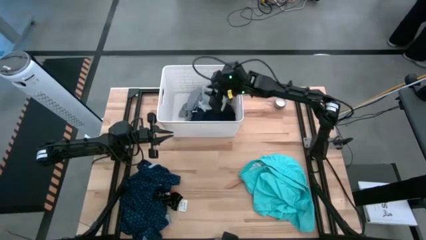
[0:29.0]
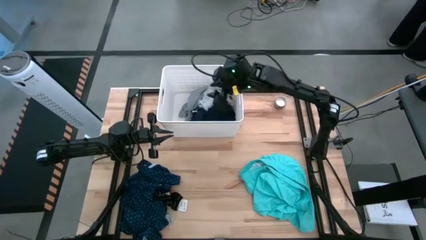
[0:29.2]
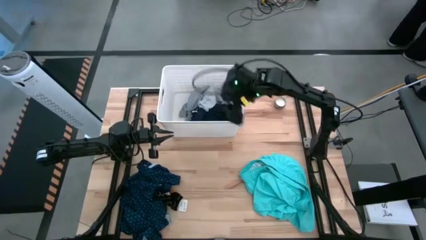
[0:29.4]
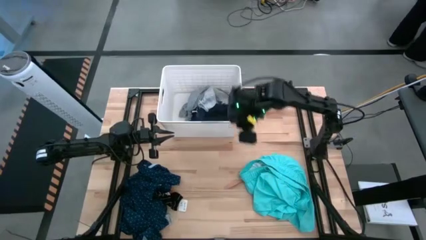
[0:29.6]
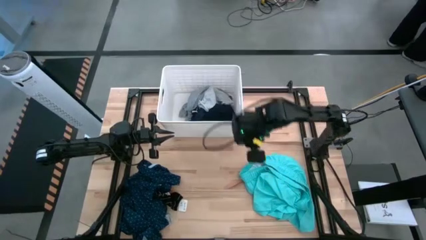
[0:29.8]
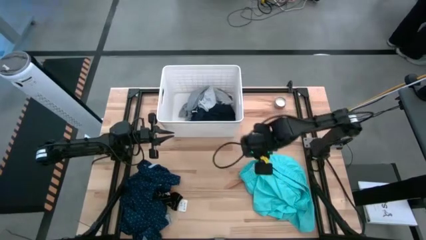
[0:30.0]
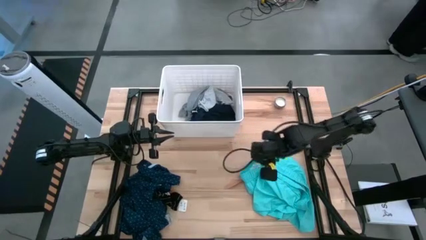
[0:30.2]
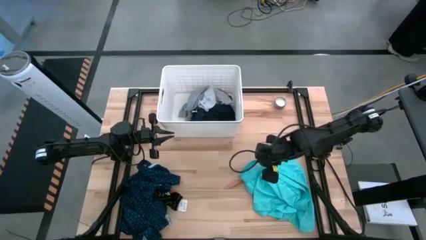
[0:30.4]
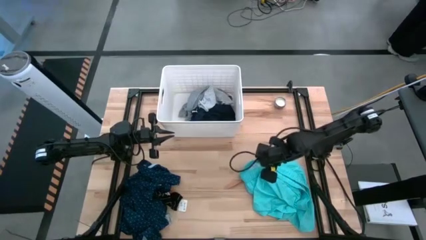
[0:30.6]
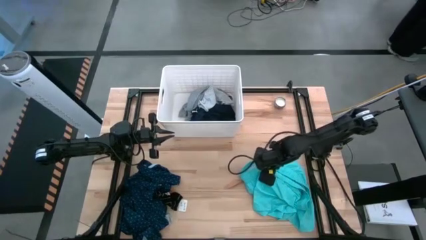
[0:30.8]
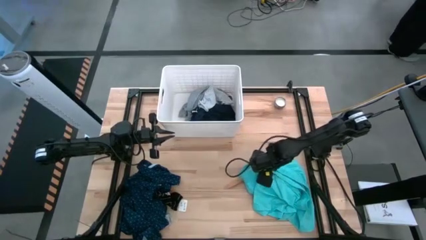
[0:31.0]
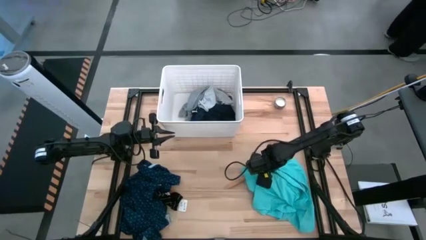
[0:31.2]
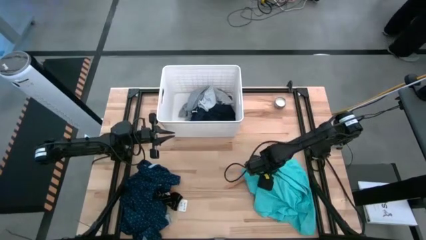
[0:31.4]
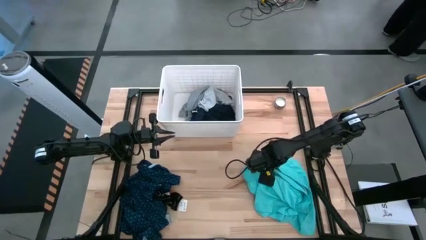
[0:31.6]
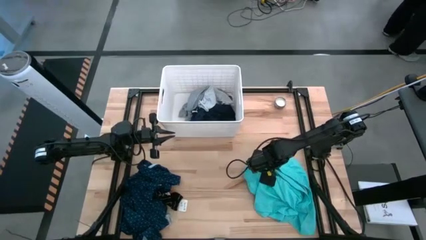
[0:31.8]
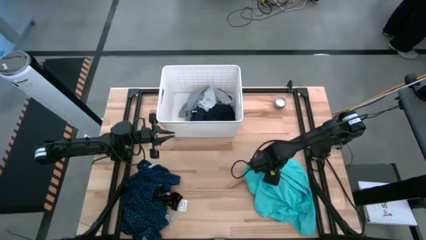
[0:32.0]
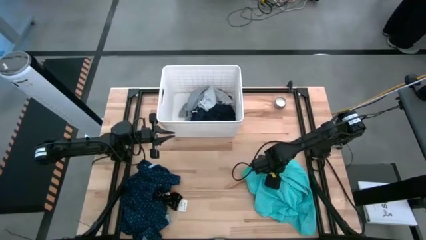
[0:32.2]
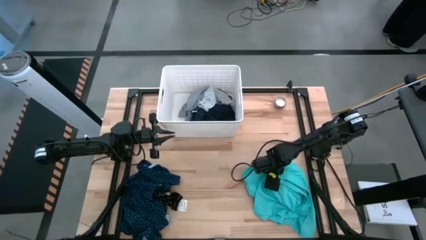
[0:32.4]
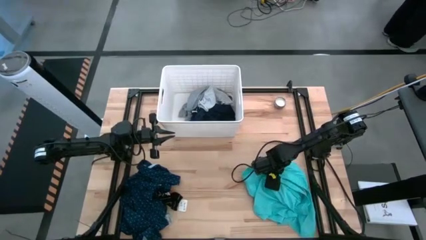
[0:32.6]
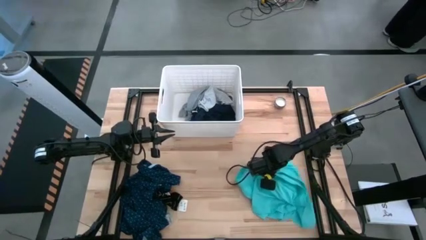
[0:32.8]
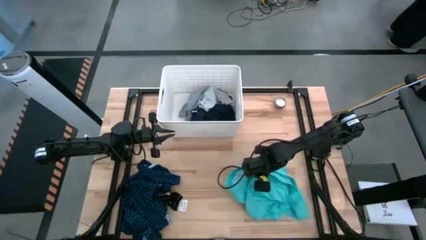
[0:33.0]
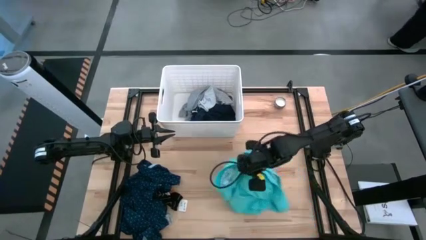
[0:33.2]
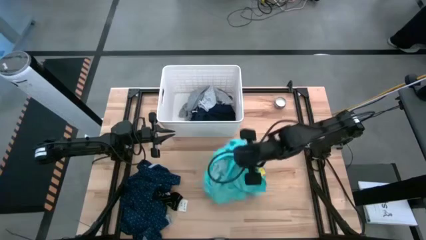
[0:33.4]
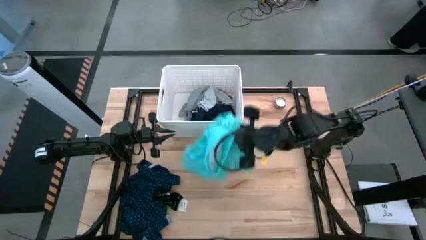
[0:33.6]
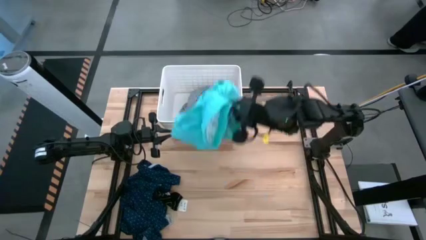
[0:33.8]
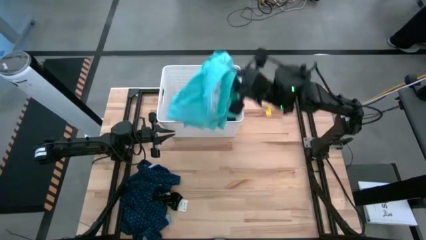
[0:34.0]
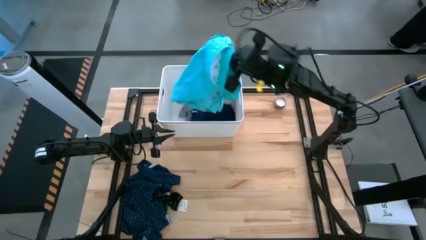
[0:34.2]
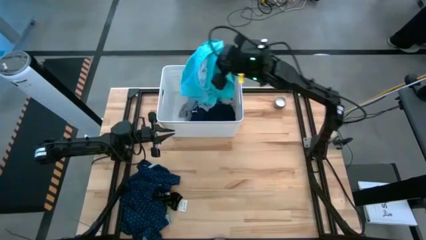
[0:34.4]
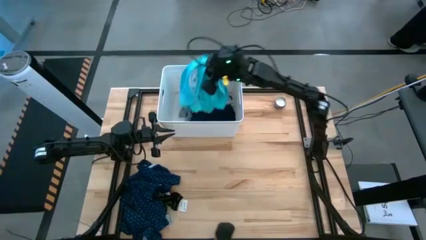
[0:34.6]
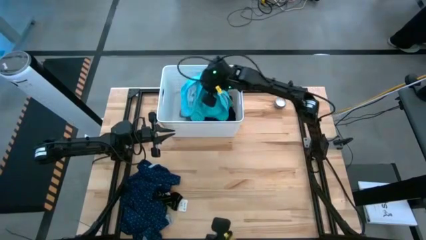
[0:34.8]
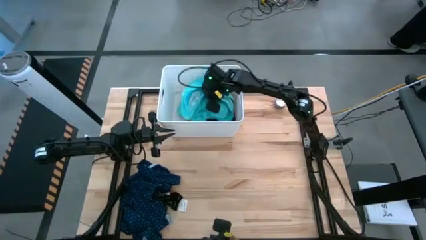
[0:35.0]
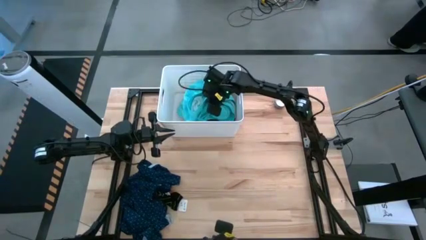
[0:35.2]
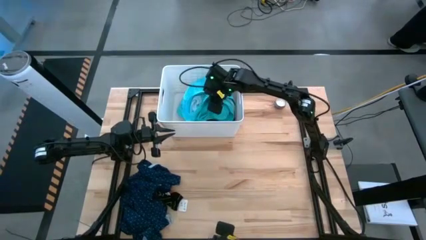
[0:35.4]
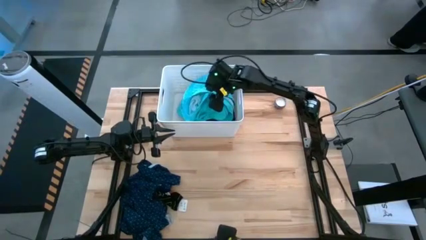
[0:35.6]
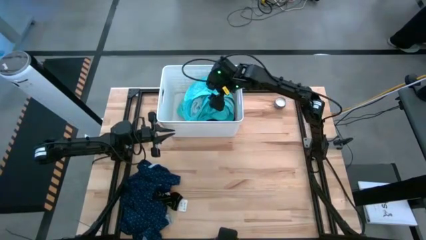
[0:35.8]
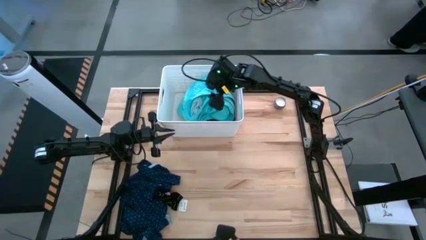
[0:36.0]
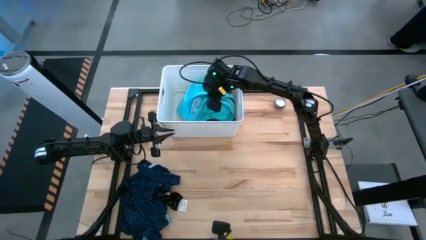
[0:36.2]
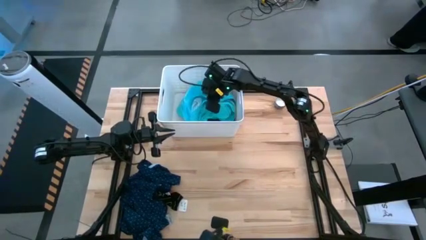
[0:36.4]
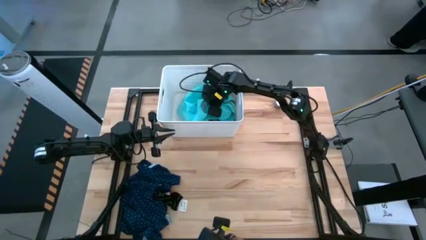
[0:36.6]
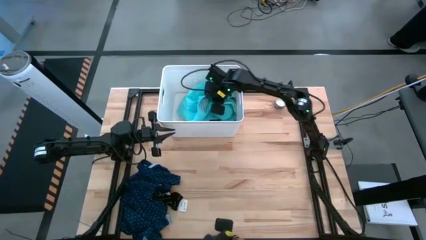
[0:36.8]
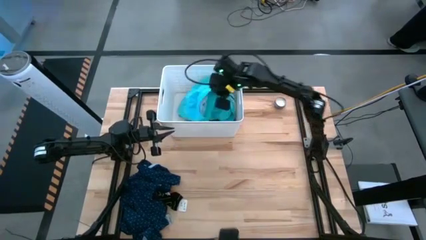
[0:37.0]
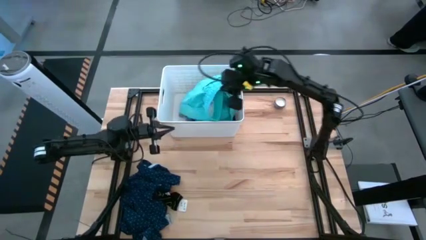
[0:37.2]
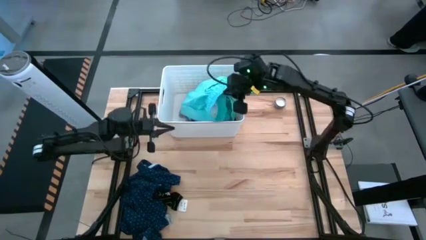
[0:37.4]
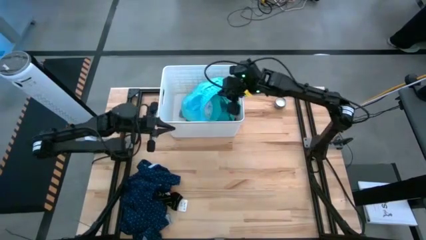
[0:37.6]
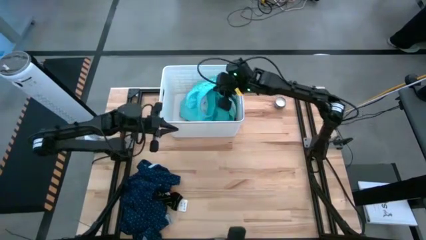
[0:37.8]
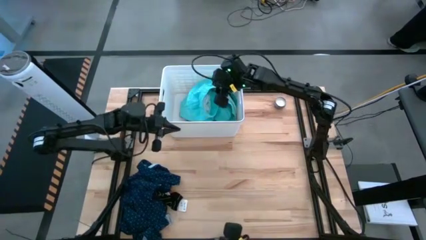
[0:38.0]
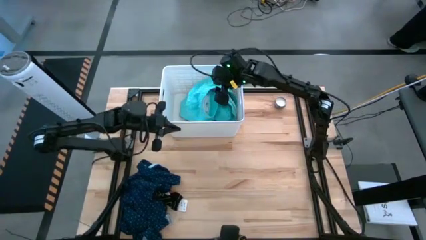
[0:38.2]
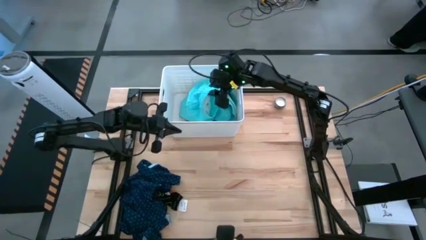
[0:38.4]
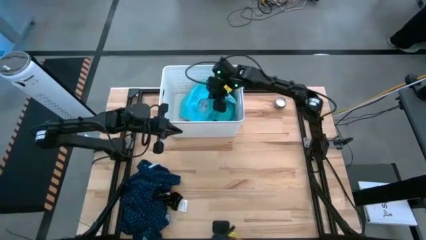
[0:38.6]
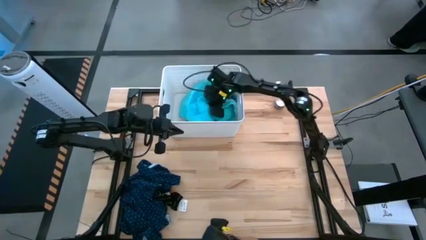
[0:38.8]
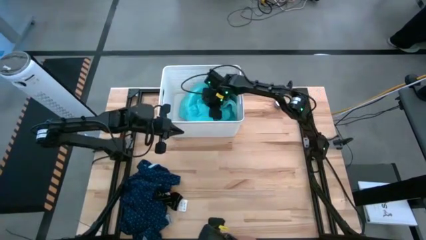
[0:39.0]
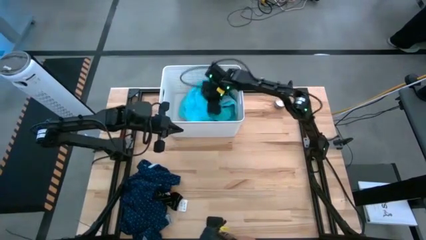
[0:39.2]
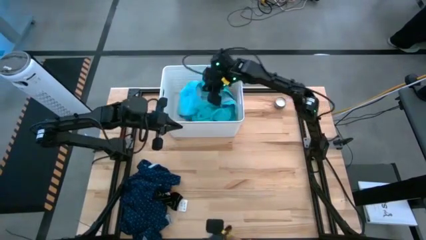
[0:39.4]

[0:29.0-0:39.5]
Task: Sort clothes
Put the light blue shorts into the white laundry bin

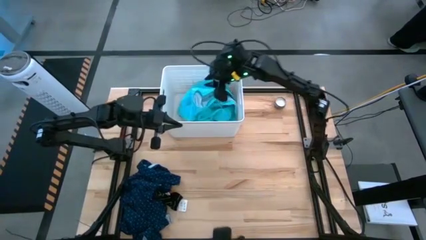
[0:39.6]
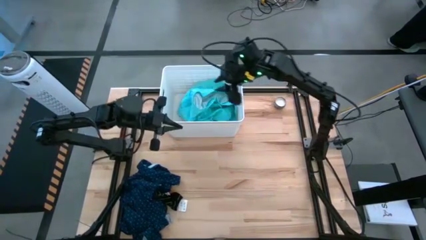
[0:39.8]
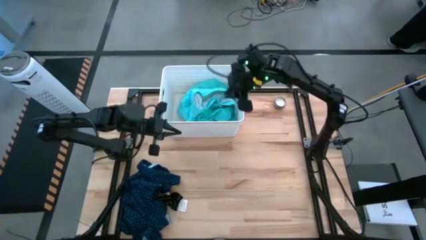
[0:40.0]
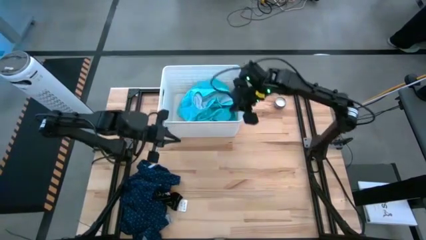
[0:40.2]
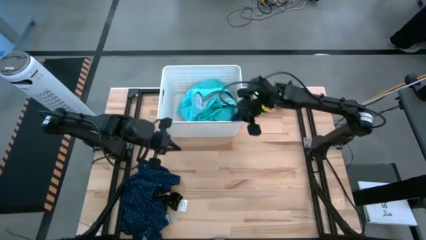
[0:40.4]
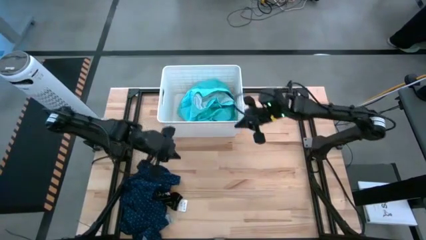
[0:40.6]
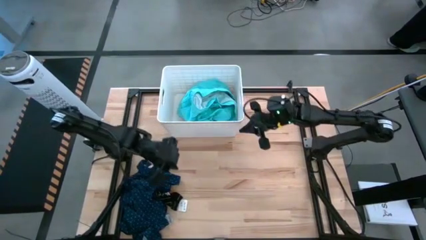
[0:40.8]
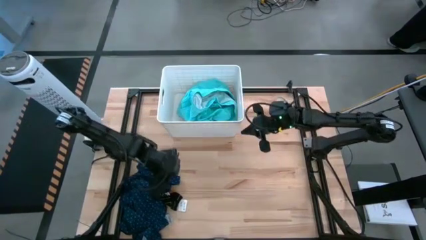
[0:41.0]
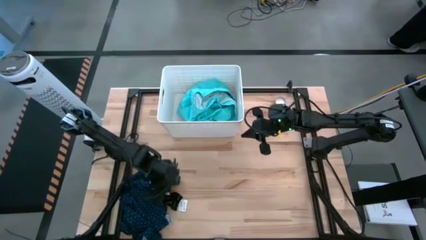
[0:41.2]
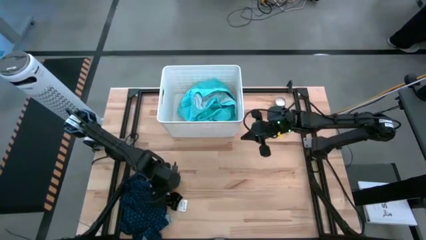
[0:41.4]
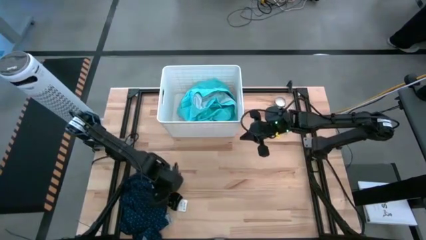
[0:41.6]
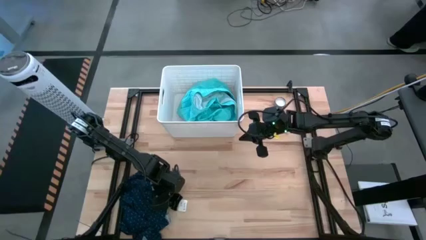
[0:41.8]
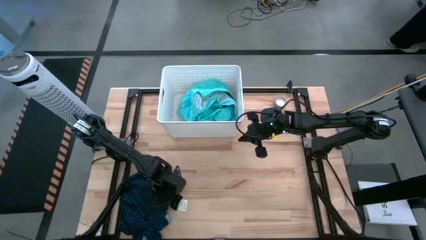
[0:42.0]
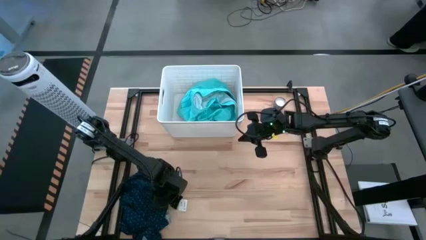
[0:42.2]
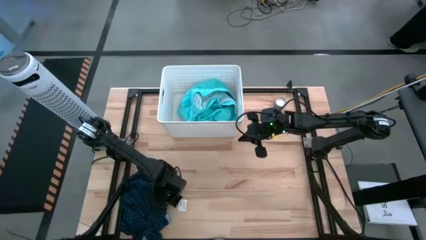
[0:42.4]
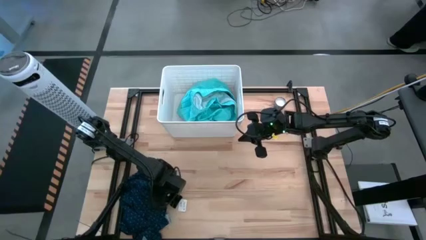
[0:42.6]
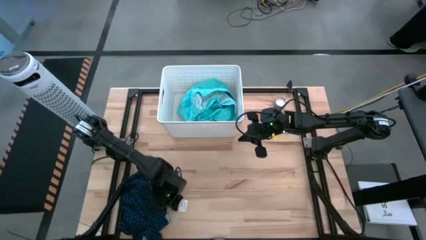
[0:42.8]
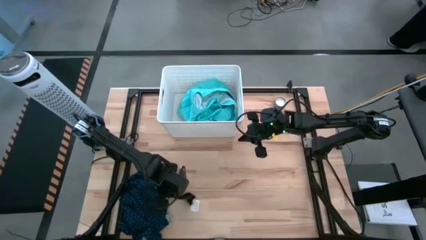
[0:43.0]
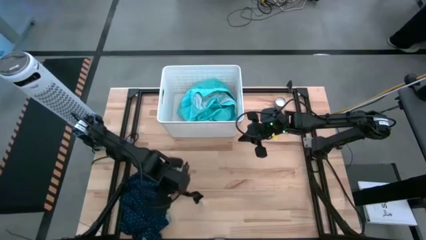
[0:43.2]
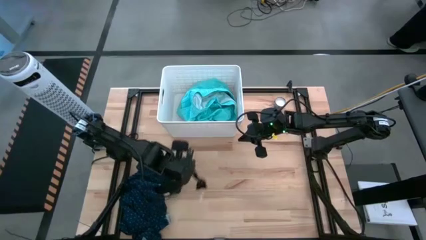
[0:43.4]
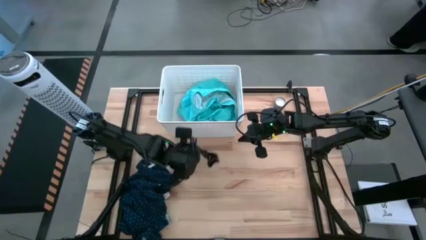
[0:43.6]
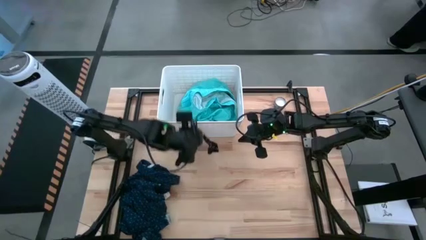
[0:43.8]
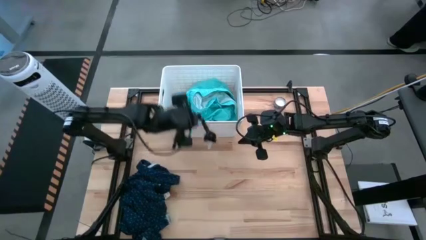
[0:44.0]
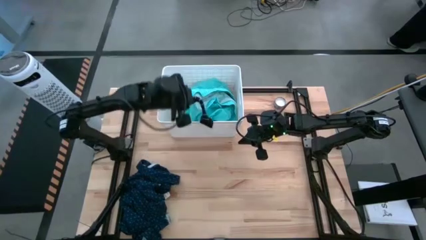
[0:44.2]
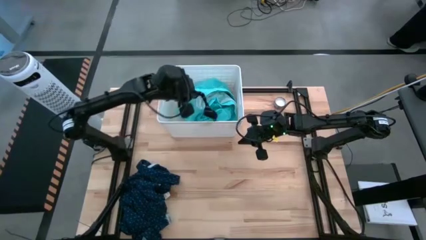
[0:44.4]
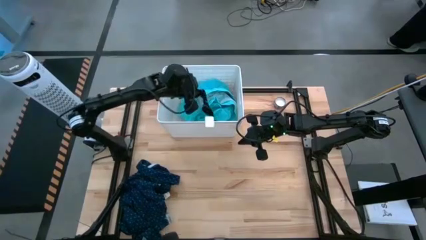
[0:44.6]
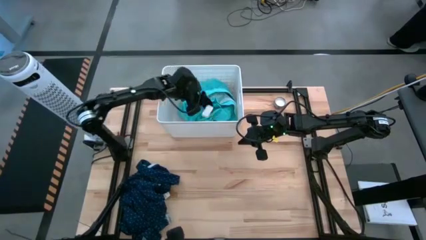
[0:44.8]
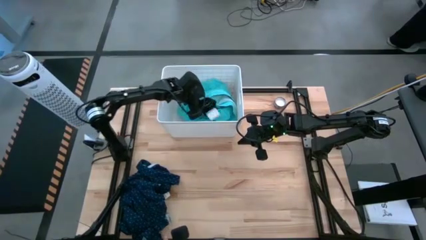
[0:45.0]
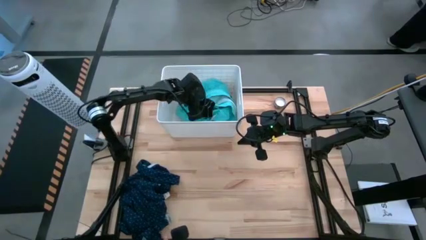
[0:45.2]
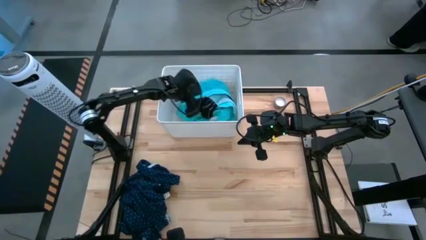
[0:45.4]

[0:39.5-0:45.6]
Put the black sock into the white laundry bin
